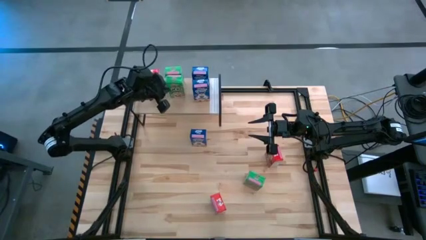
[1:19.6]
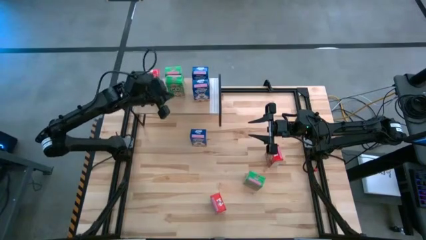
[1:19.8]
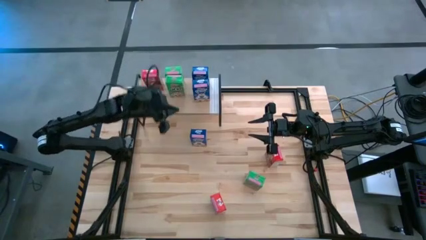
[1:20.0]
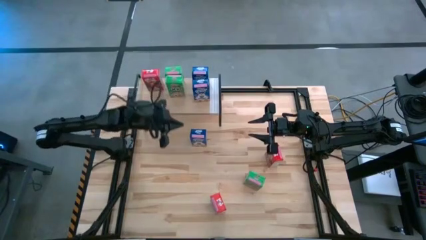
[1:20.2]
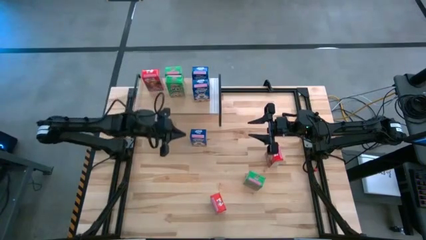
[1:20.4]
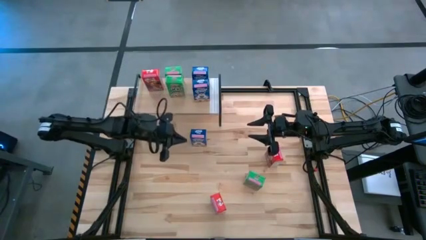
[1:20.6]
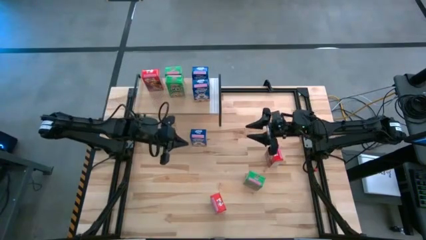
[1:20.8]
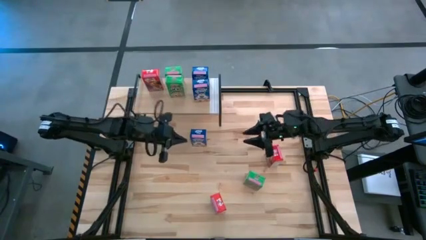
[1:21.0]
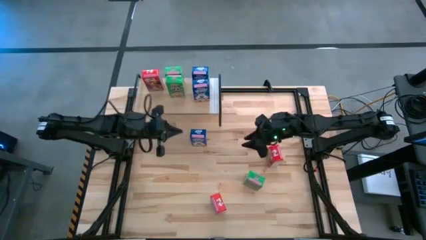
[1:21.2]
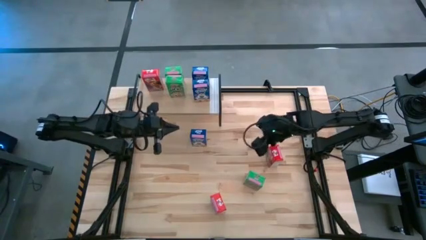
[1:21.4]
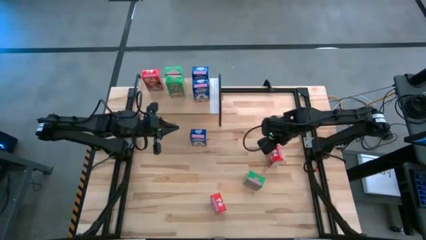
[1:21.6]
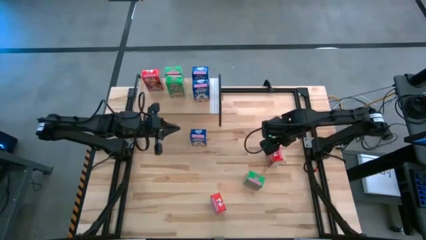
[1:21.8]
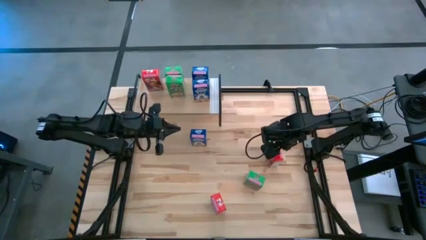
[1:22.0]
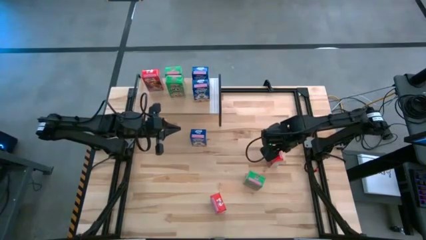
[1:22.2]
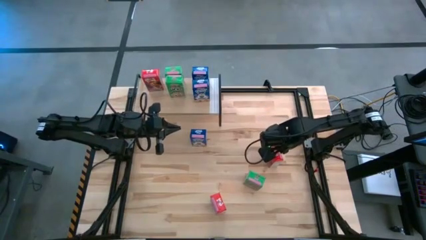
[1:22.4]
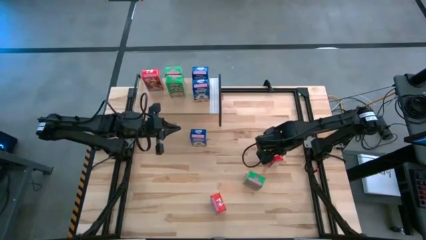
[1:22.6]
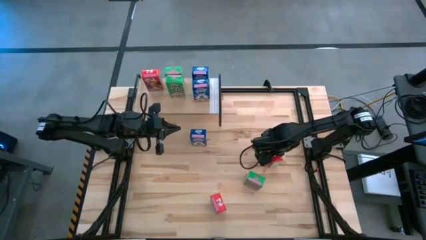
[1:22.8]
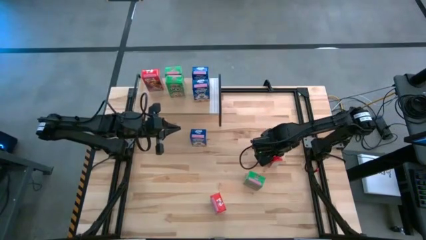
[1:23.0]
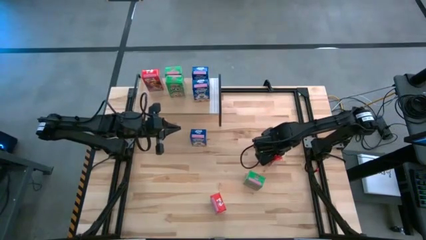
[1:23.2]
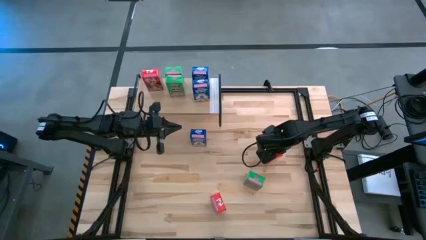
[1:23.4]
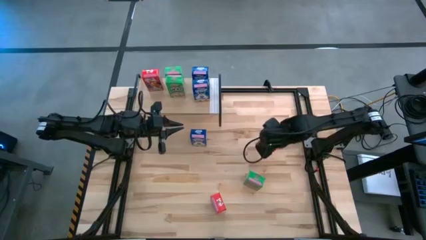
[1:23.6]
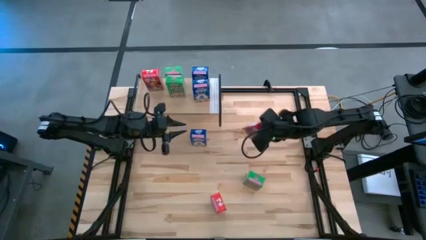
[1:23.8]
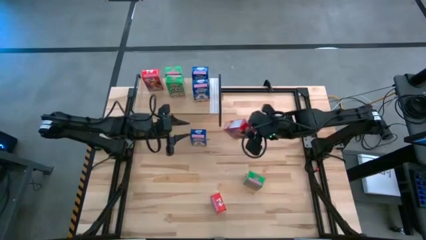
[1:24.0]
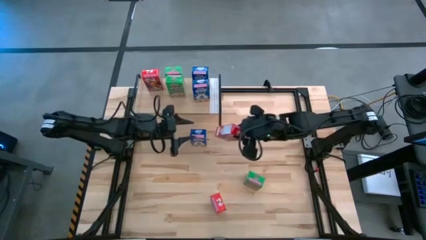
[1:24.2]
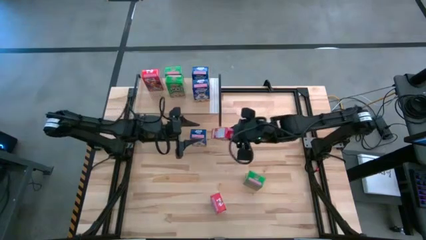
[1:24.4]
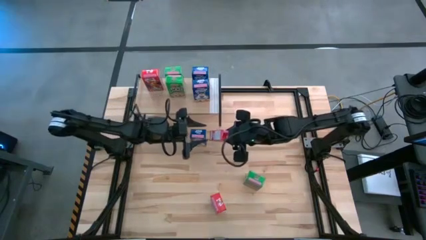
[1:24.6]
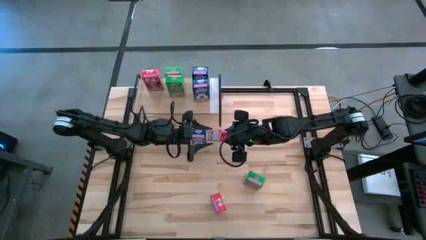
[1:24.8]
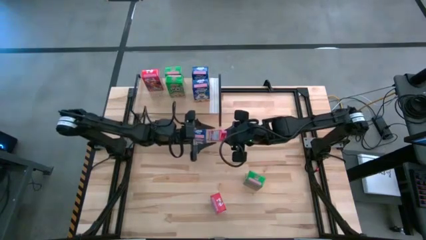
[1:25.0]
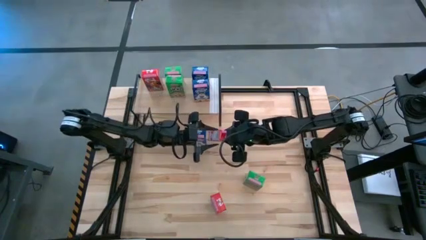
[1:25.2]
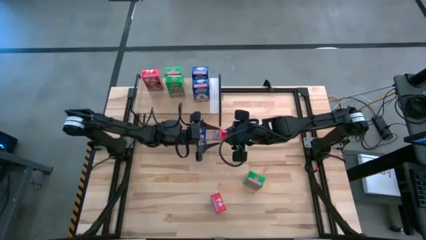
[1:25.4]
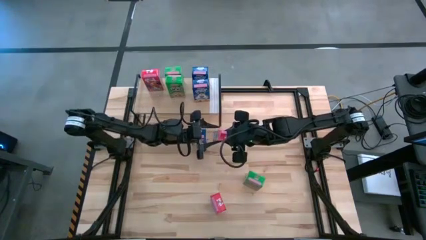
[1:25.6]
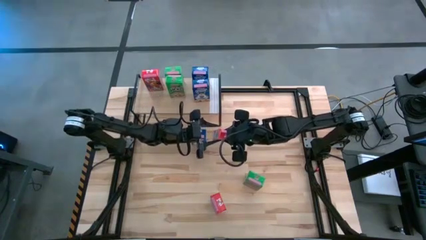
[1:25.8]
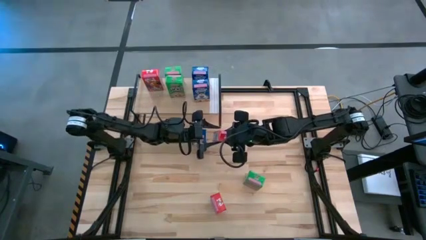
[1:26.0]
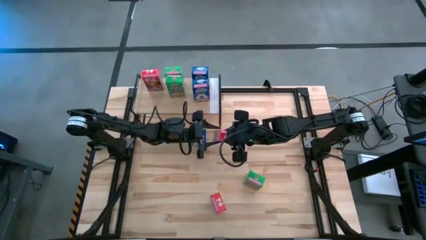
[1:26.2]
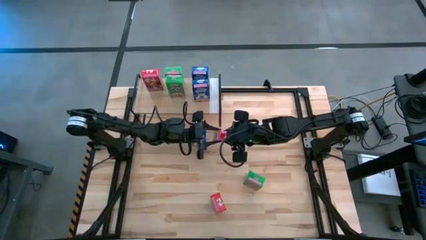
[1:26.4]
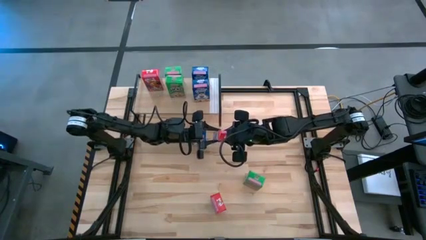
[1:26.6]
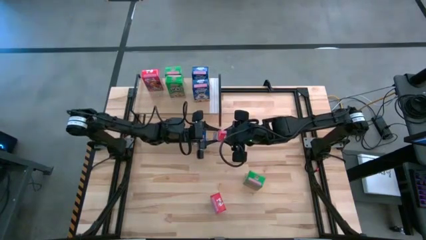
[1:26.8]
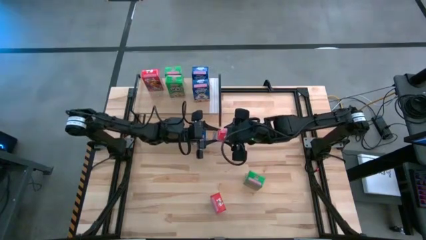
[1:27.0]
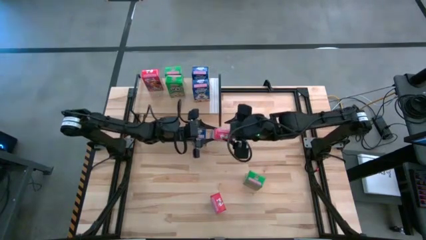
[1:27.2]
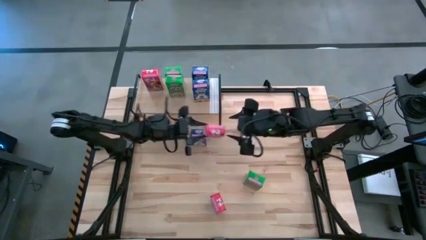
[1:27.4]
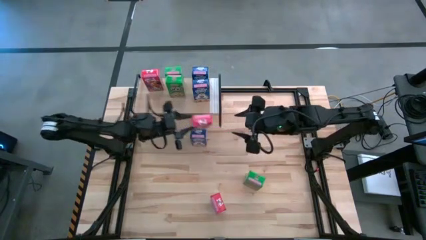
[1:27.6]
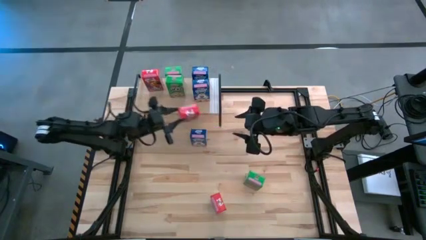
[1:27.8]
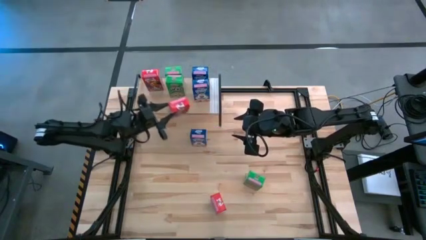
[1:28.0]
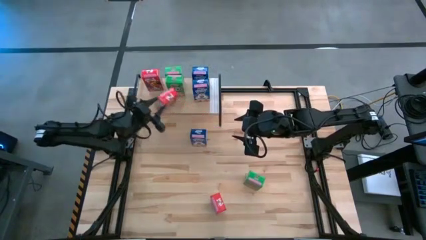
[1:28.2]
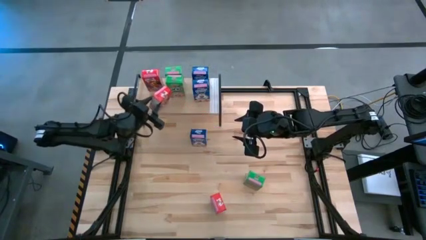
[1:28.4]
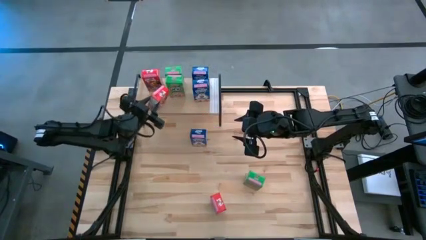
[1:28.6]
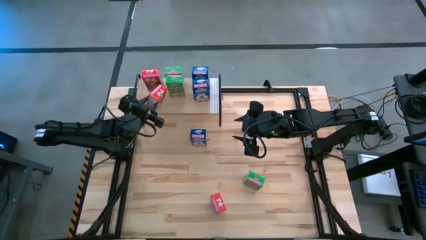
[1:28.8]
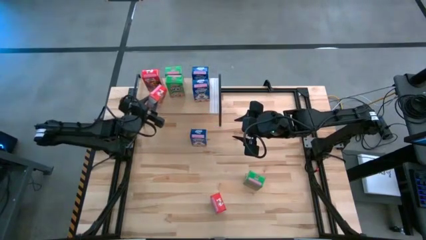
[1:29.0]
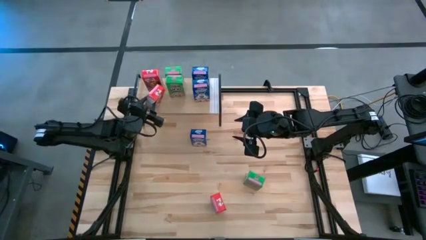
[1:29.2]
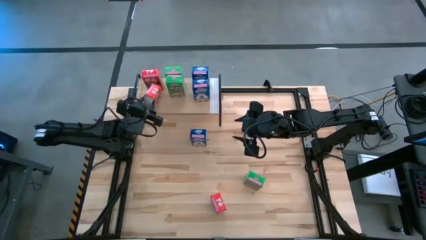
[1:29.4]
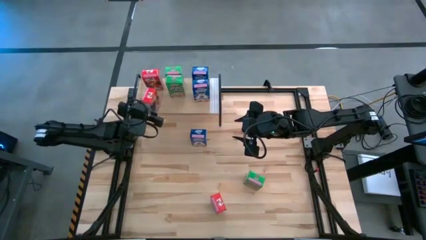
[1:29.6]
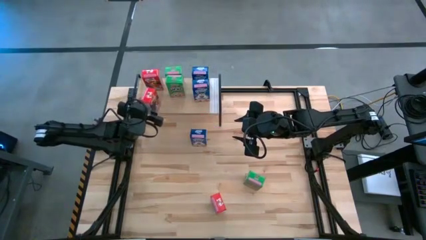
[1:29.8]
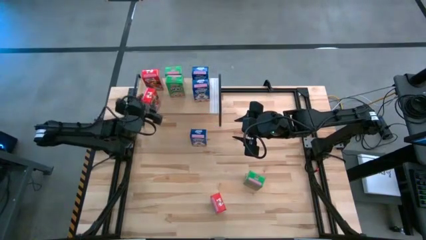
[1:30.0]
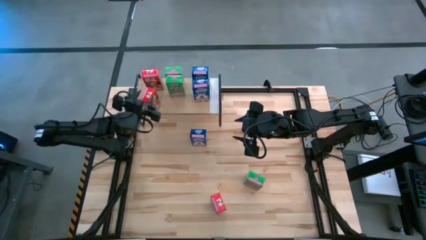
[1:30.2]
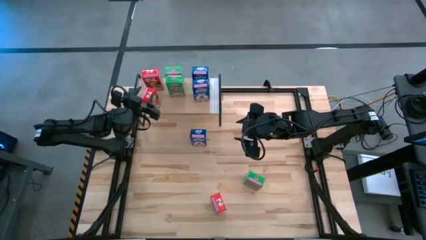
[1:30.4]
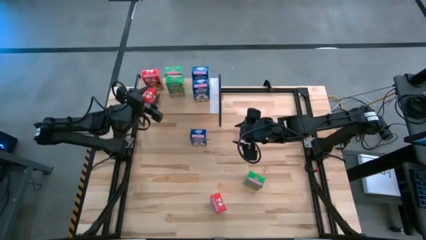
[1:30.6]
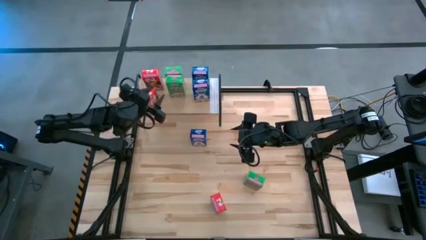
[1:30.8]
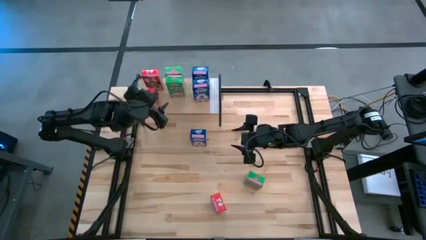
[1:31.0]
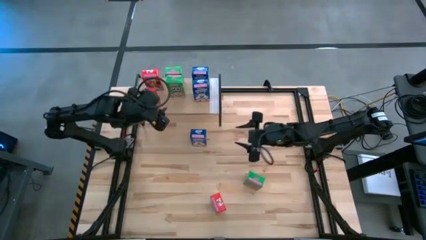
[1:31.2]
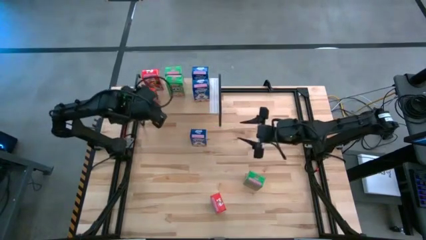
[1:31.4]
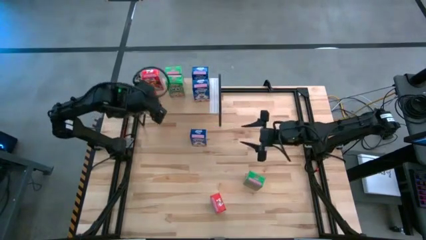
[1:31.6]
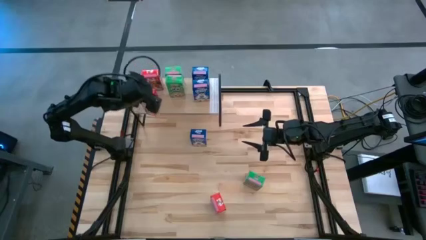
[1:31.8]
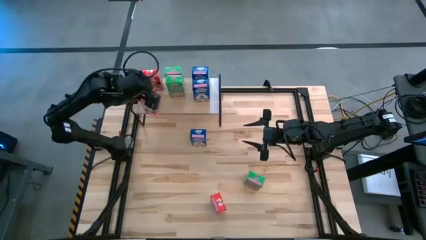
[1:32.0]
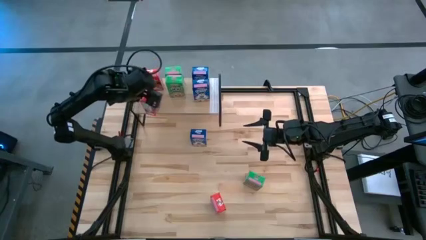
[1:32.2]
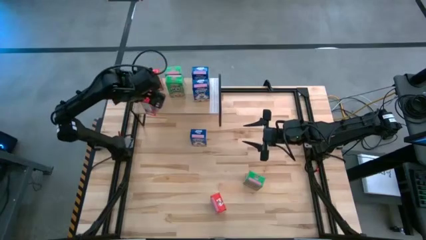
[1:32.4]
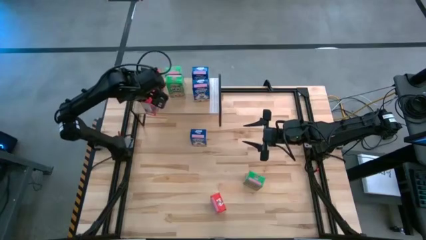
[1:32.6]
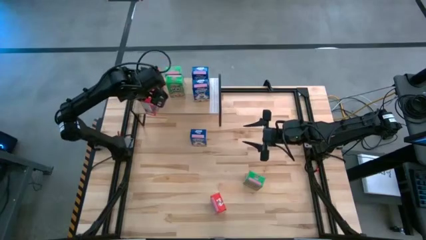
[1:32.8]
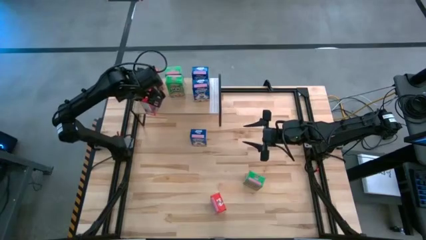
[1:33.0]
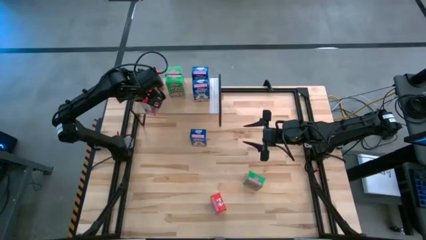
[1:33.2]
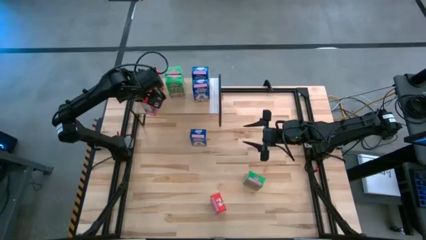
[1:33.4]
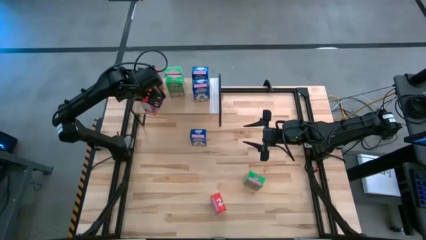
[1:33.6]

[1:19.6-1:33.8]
Task: Stack cereal on shelf
Put the top red cereal box on the shelf aligned with the other red cereal box

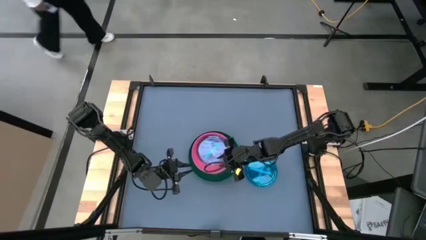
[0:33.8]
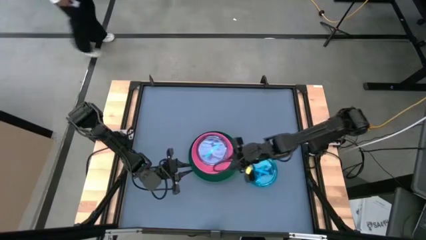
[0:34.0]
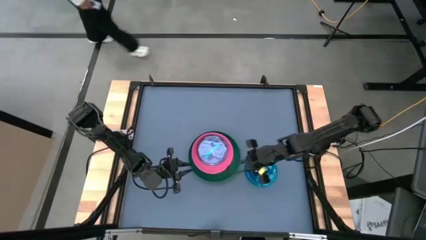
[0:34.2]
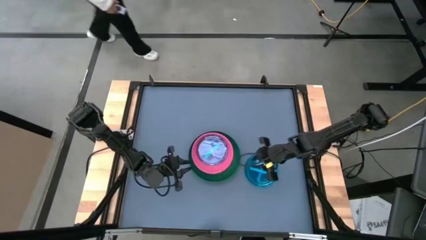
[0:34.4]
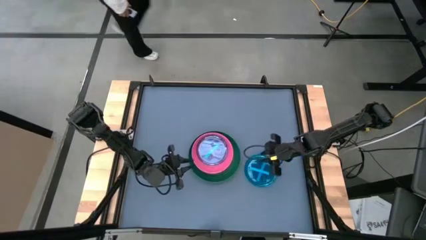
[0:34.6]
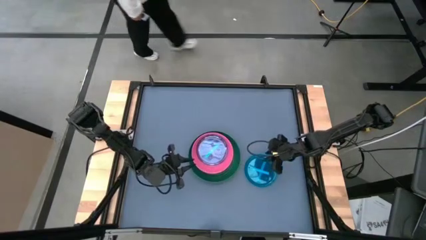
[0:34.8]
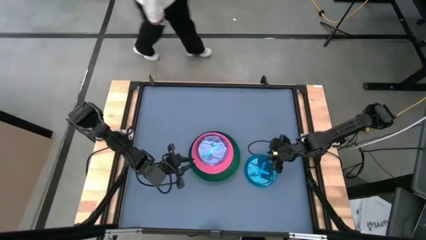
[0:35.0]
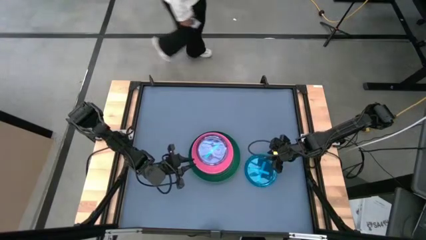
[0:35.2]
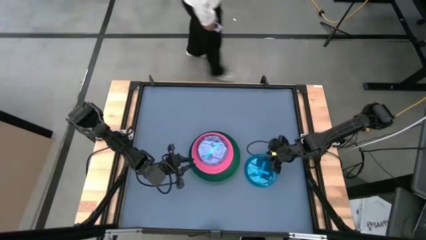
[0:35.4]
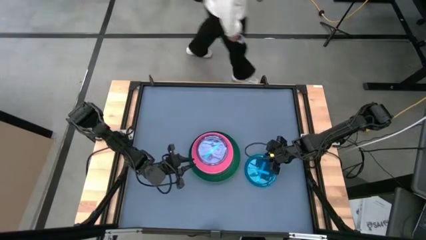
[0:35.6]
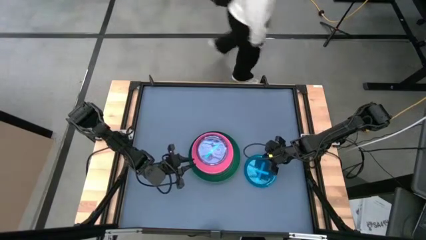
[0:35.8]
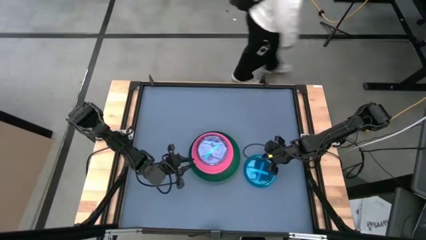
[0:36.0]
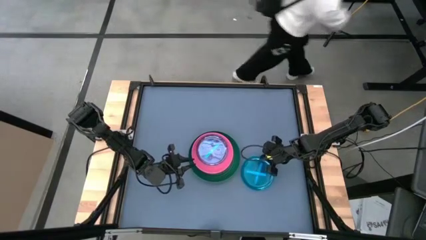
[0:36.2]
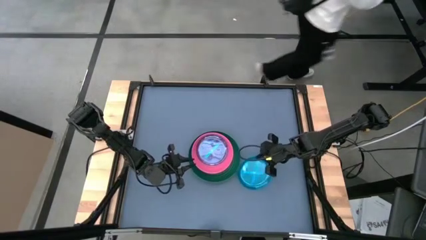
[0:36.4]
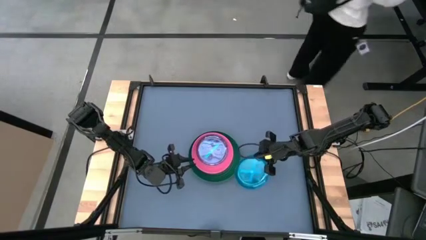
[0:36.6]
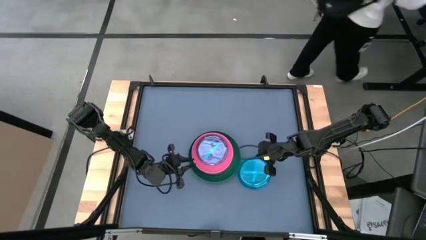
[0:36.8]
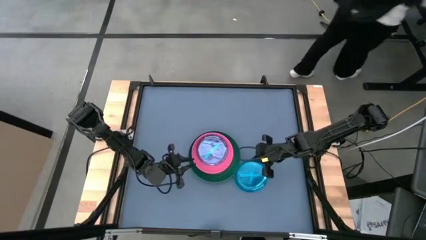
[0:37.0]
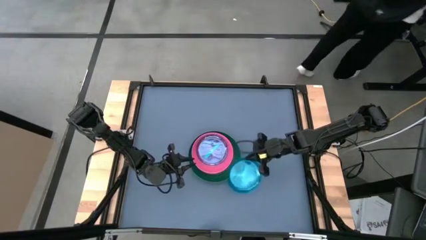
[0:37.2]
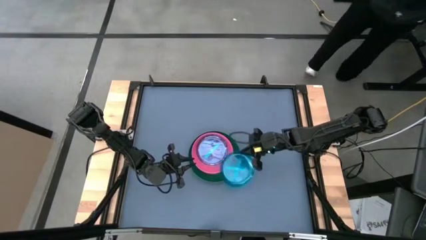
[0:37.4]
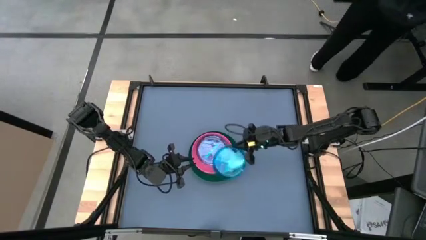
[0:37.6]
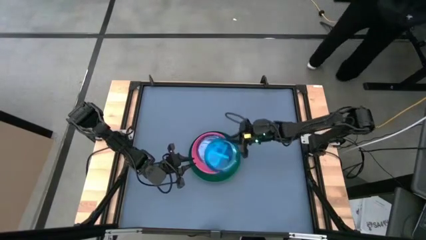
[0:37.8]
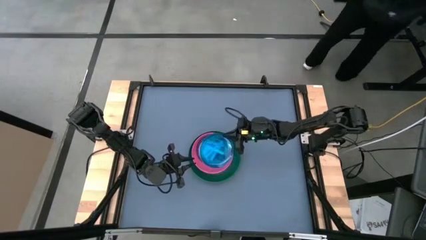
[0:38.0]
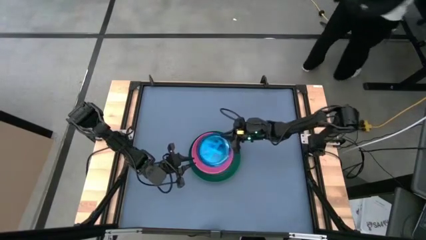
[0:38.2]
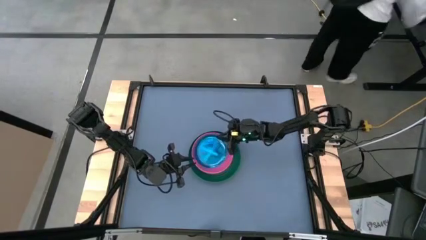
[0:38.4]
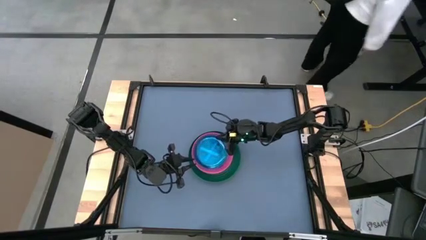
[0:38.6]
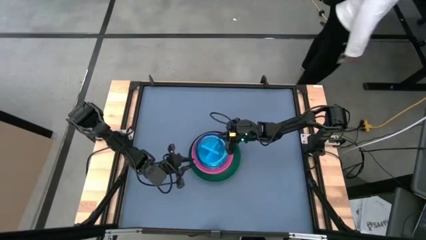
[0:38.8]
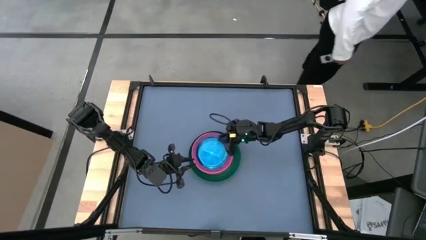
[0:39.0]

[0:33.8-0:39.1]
Task: Stack plastic plates
Stack the transparent blue plate on top of the transparent blue plate
